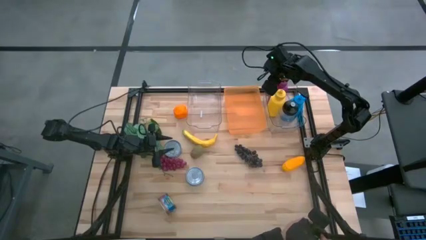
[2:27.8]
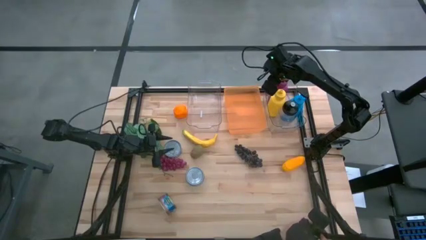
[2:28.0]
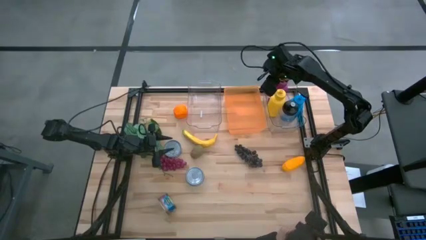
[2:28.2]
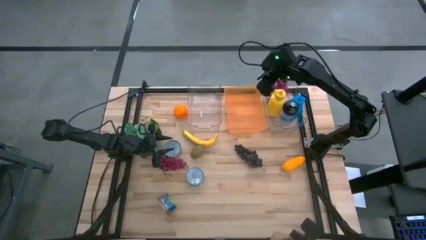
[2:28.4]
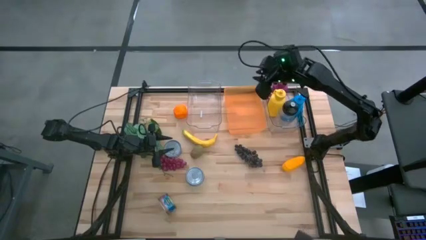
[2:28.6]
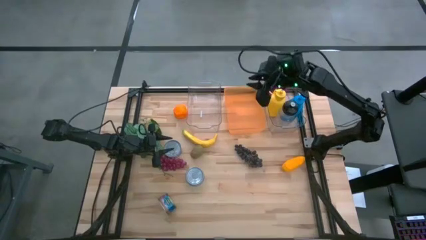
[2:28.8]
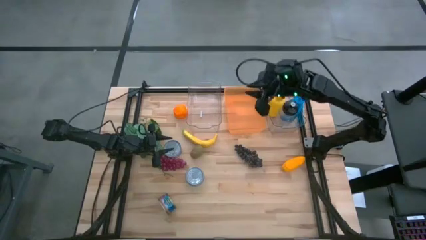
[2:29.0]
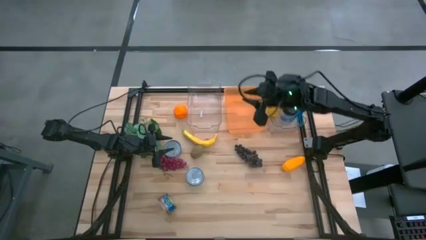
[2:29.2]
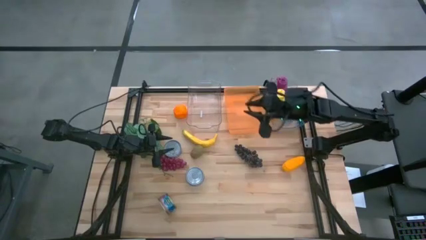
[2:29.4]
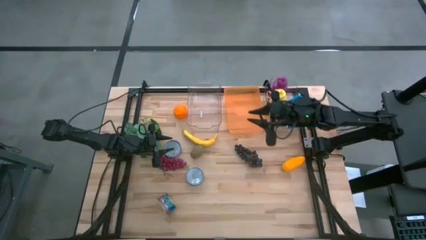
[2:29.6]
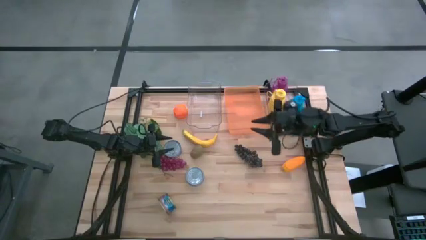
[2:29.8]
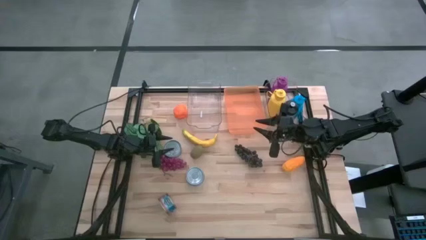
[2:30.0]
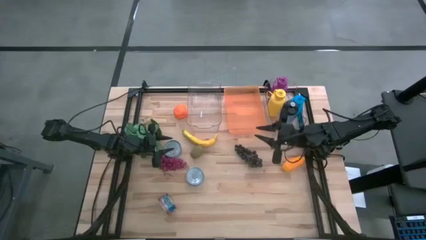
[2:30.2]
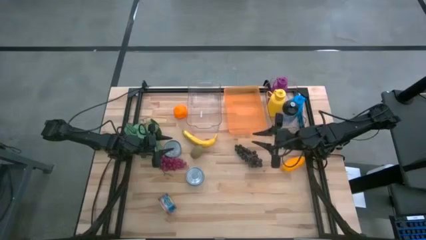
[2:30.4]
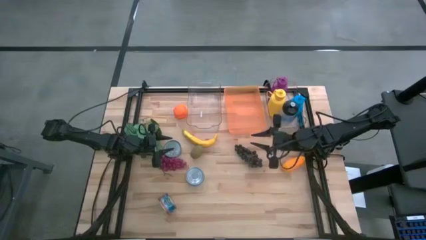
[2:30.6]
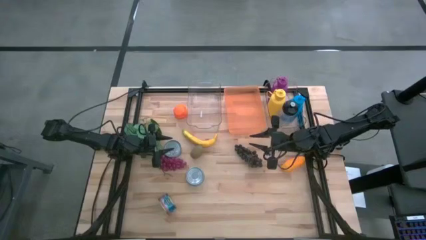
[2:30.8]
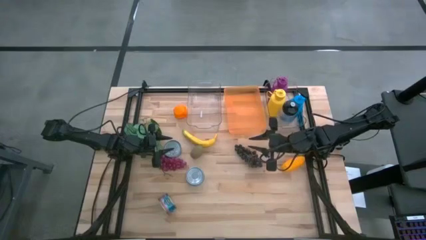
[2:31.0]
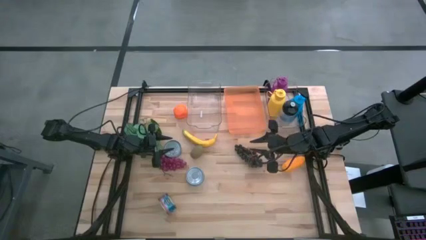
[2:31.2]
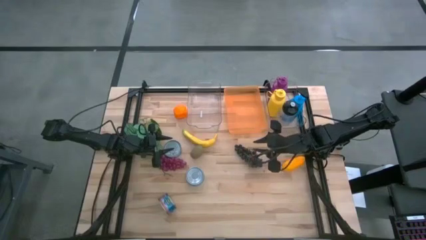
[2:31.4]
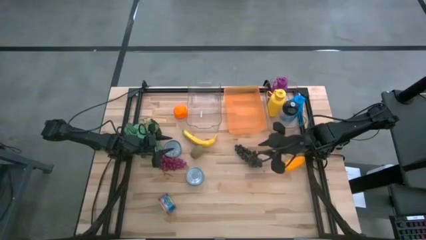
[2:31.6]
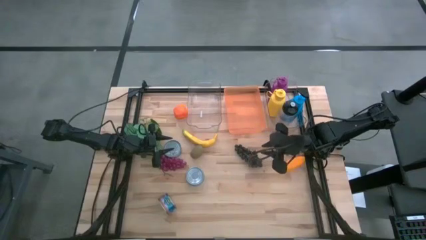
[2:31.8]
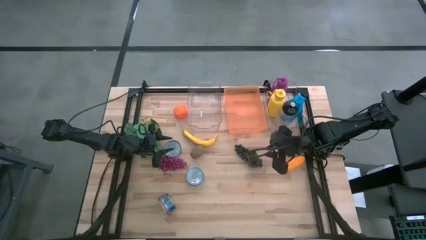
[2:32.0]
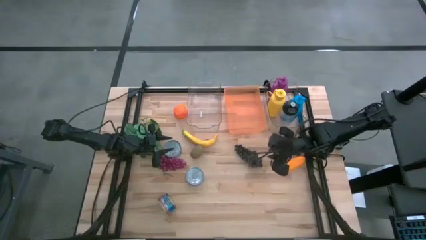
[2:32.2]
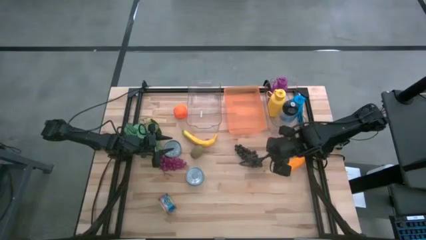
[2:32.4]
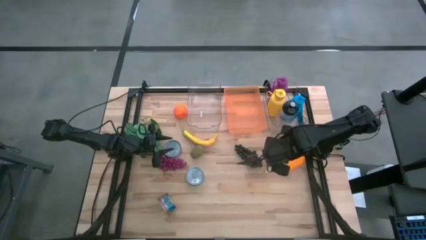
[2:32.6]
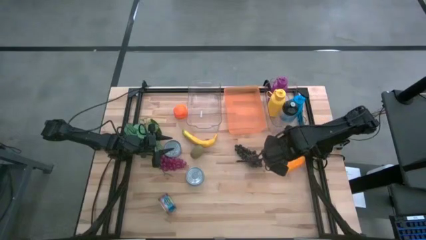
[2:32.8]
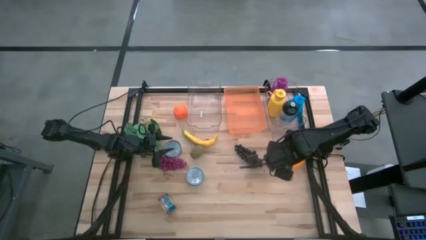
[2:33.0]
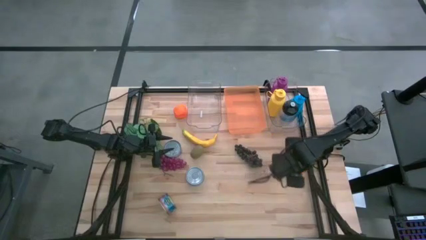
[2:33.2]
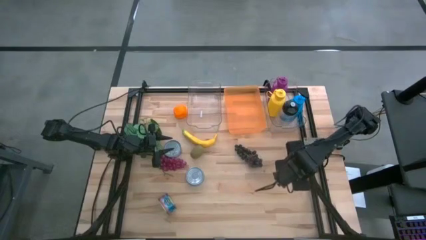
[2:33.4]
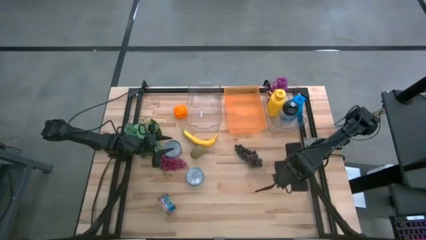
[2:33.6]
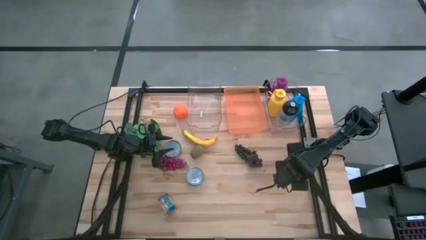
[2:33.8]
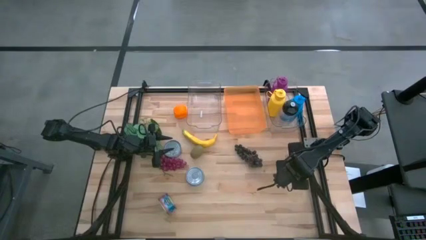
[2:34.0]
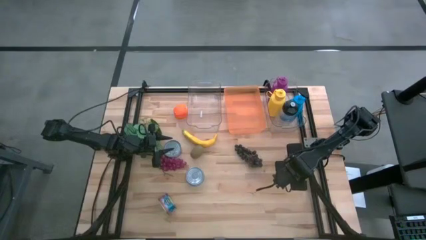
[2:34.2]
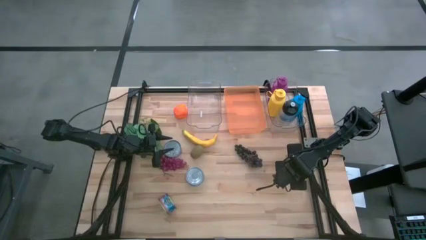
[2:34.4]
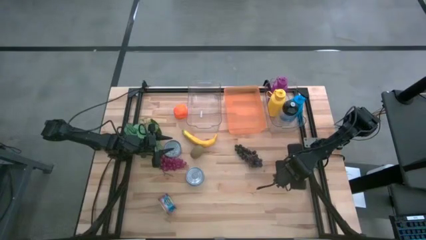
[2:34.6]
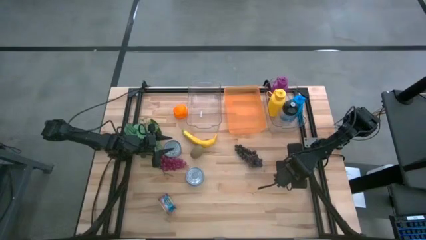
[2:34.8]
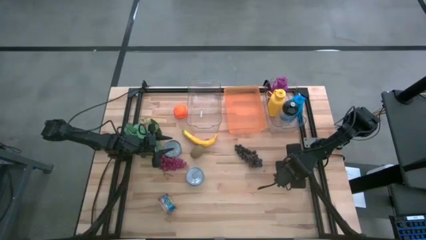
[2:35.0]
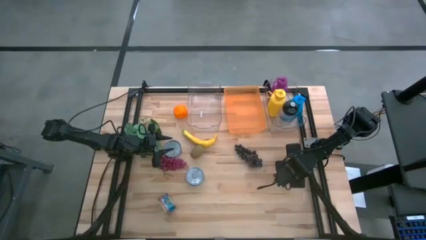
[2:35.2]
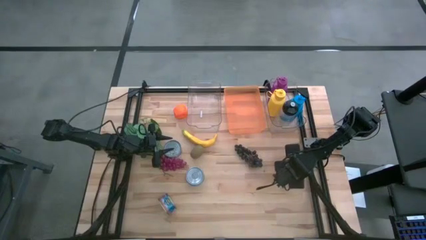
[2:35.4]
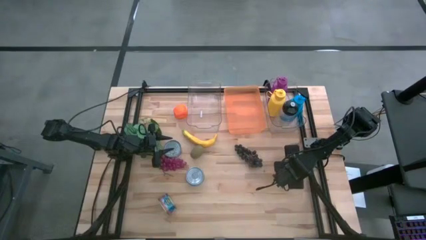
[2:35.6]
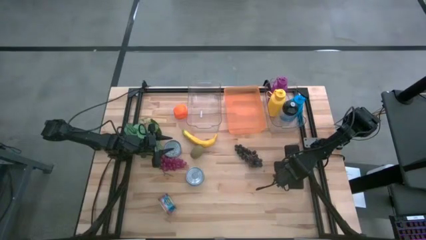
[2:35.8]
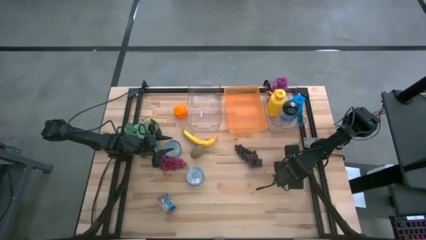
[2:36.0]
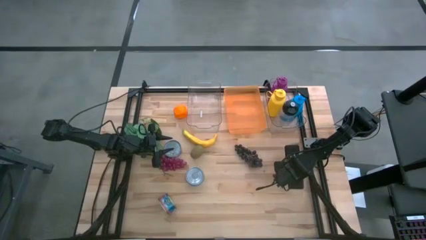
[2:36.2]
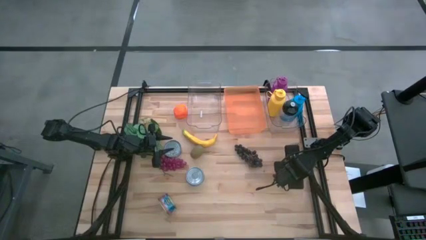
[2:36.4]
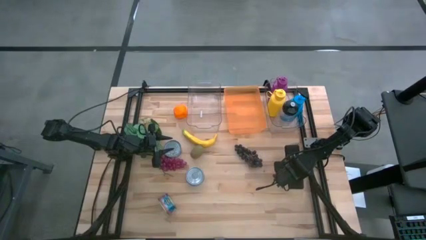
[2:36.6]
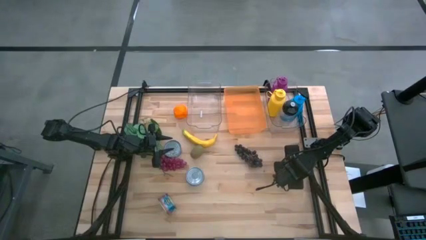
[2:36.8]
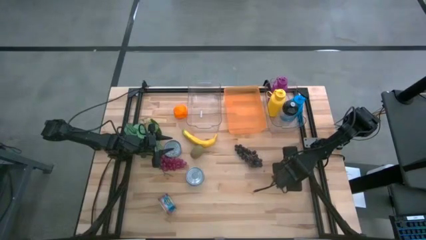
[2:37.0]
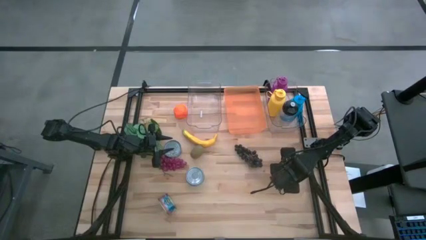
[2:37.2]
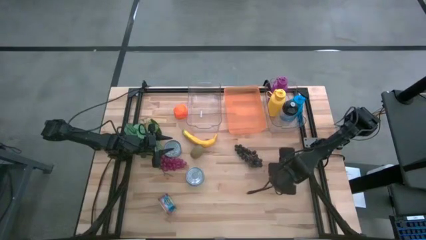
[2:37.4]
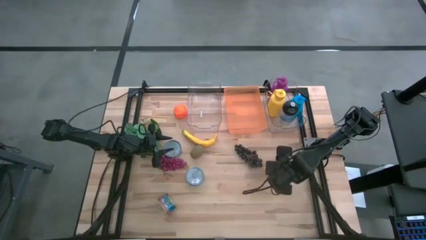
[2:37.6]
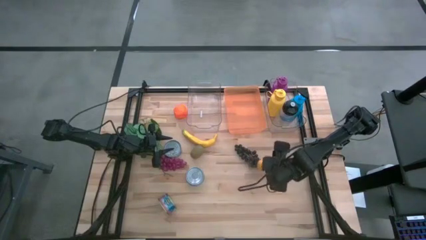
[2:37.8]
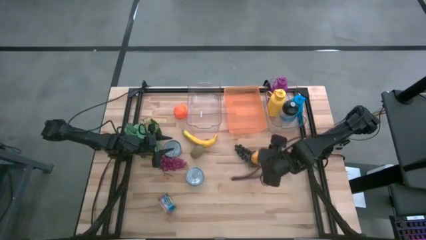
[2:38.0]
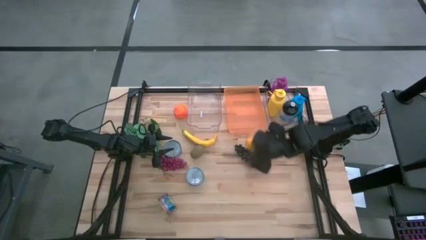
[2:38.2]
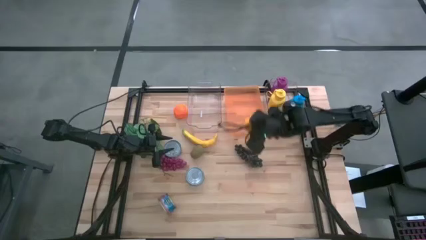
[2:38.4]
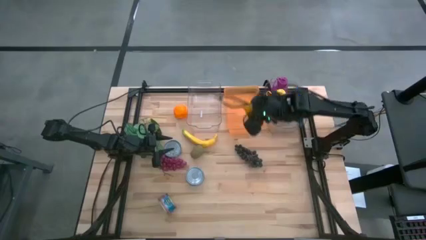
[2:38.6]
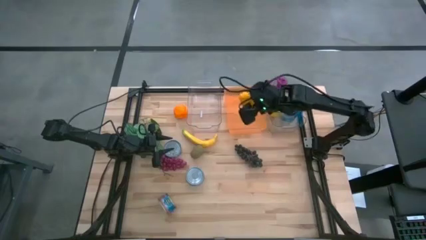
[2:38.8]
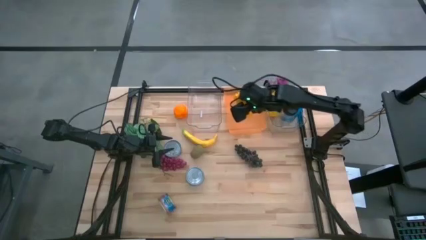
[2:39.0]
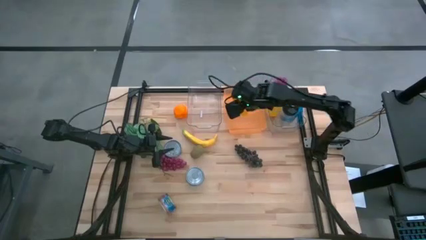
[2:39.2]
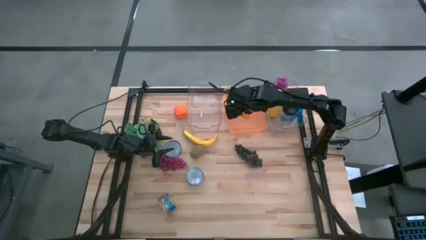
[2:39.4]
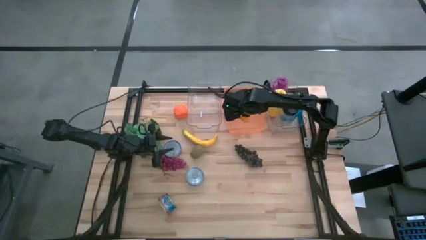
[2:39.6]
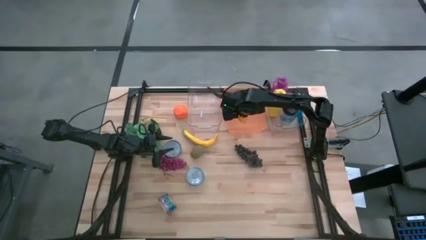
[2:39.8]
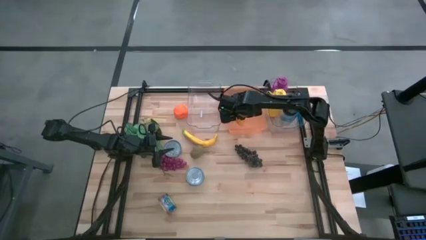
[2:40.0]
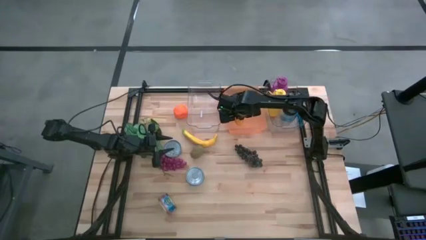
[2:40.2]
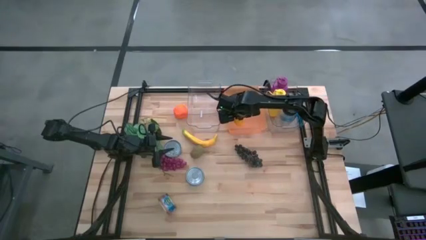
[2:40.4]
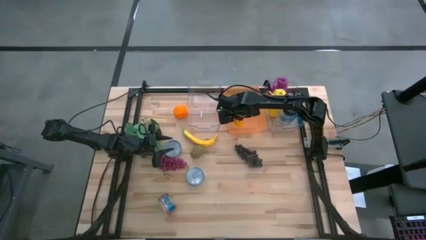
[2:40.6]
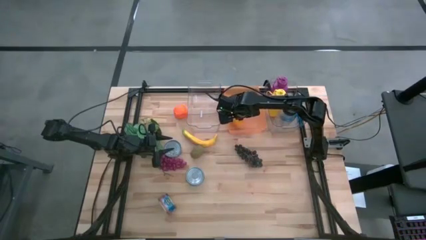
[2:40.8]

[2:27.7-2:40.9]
Task: Pick & Place Food Item
Put the yellow mango into the orange bin

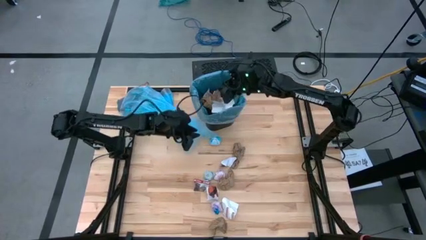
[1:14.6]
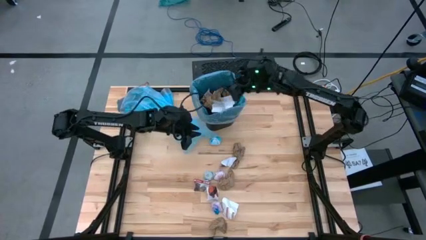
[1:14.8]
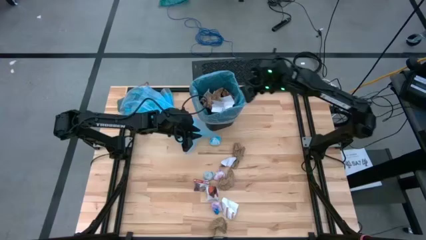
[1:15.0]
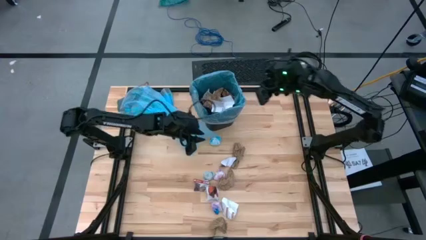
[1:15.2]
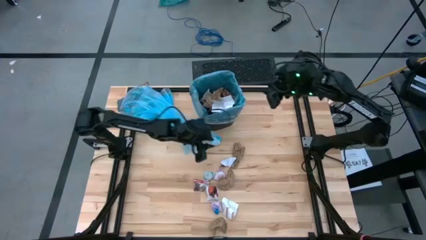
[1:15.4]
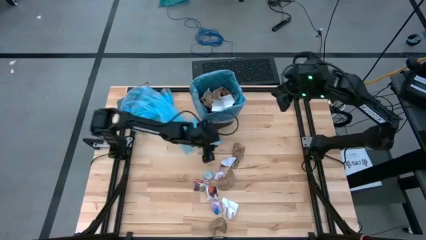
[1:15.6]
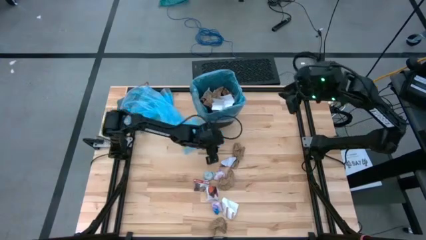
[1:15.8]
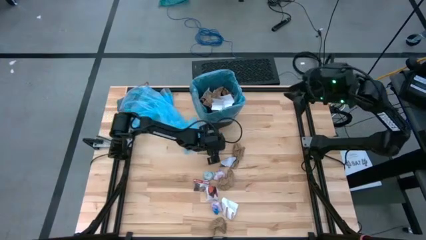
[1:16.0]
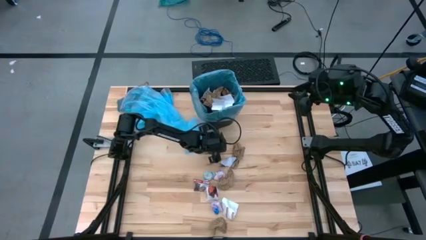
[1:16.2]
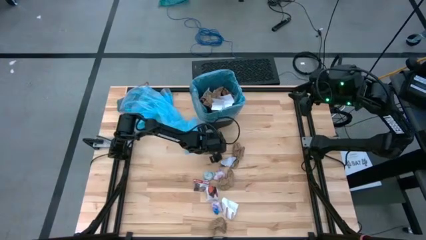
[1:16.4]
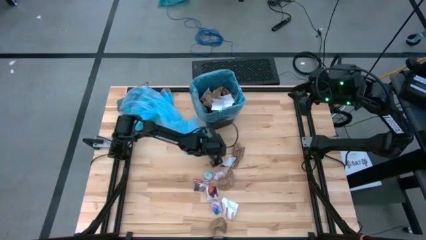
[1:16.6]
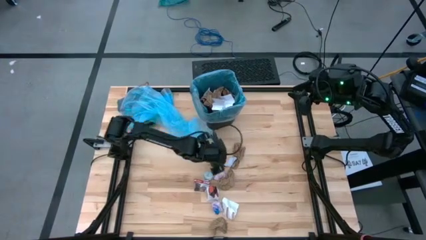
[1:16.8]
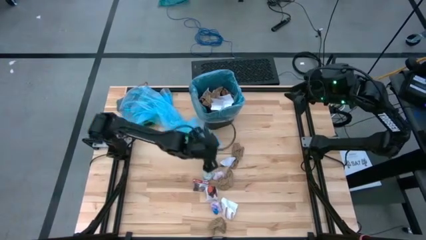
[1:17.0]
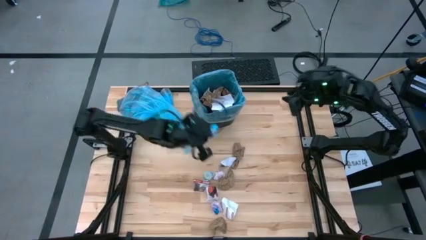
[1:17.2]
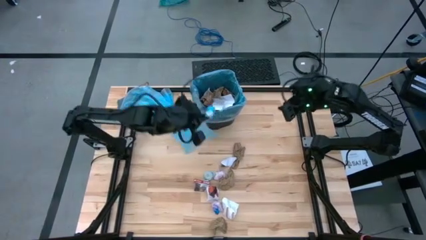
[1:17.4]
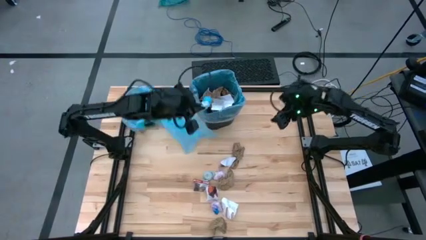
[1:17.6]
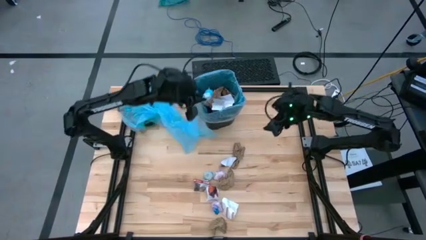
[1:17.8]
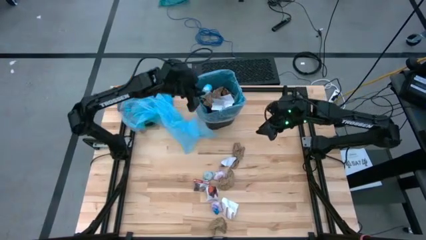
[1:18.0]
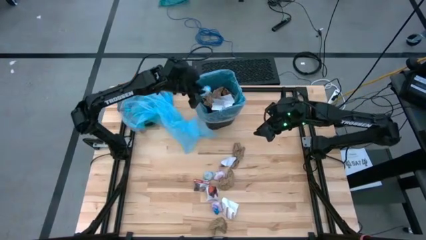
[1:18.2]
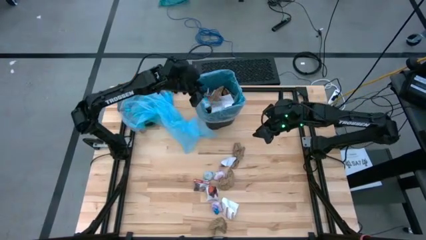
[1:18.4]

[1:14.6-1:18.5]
Task: place trash/remove bag and relplace
Put the blue crumpled plastic bag into the trash bin
